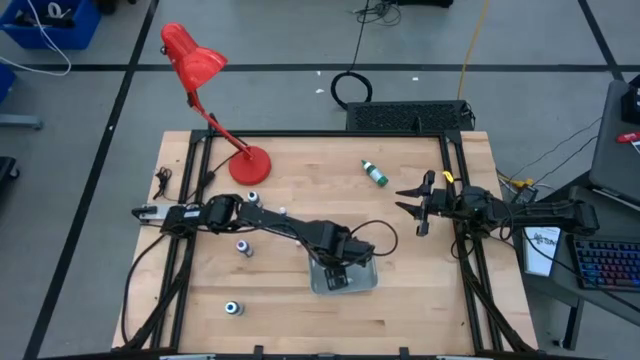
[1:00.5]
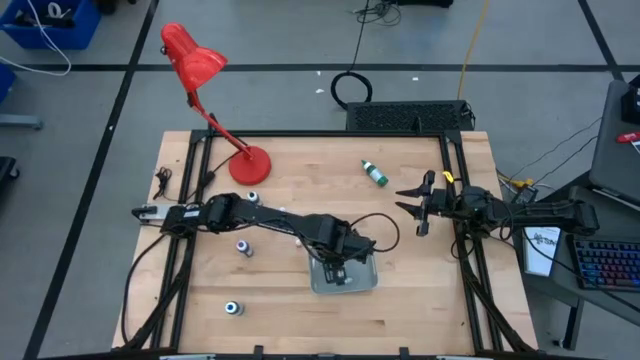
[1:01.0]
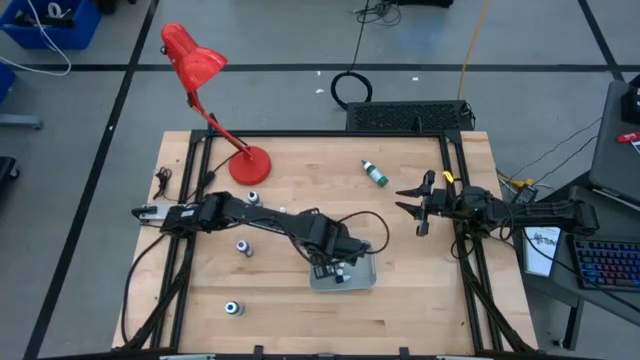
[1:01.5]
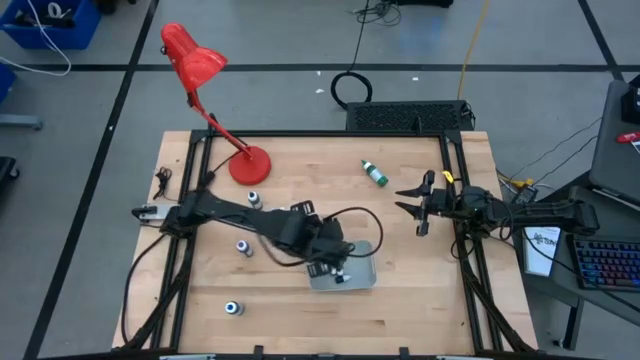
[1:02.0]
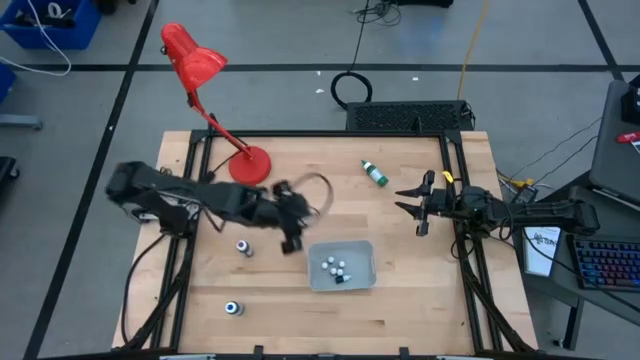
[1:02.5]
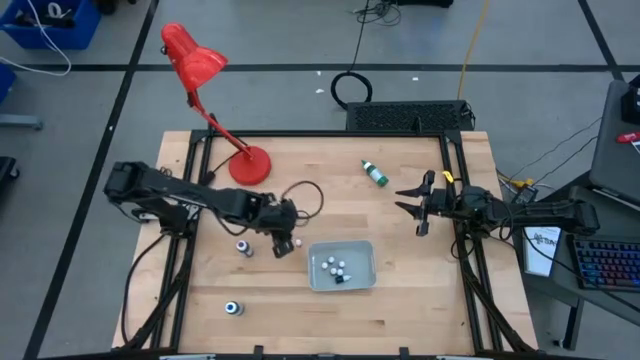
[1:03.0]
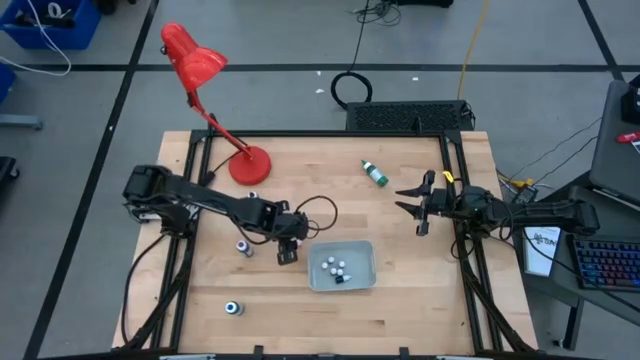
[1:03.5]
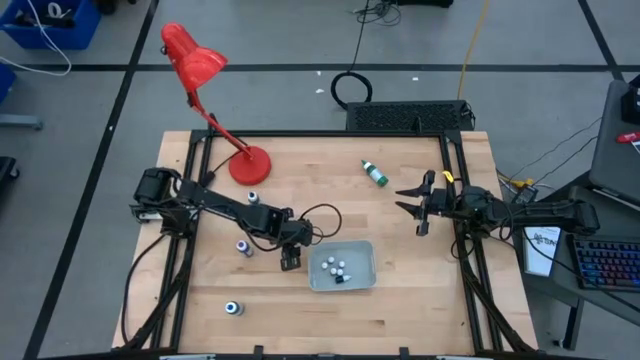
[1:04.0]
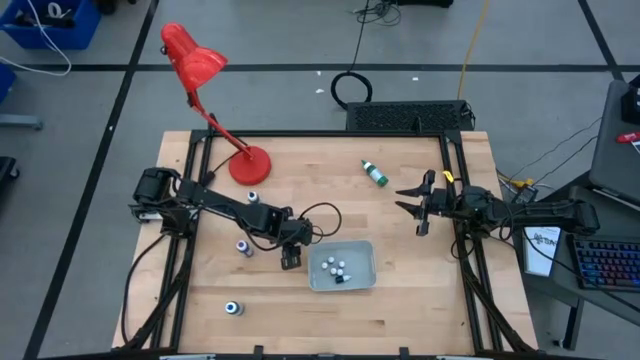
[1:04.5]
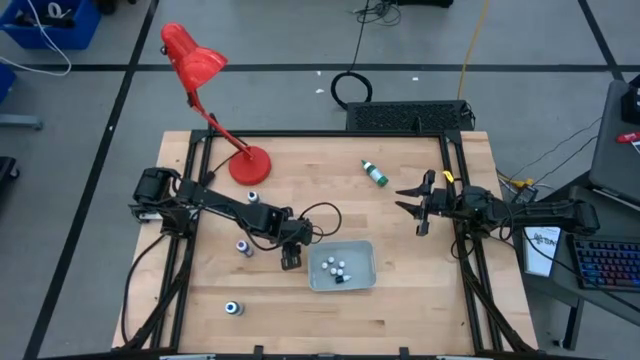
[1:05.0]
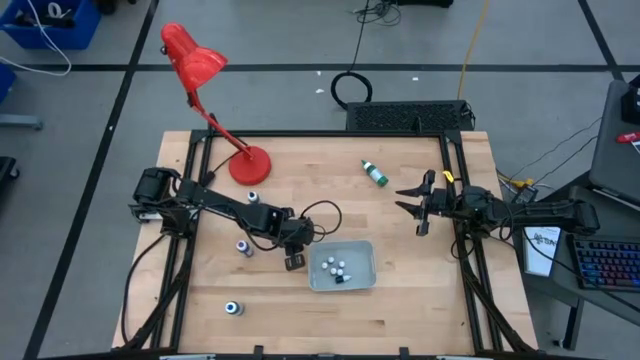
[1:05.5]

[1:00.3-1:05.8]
Task: Pick & Place food coloring
Put the small orange food coloring bottle into the gray bin

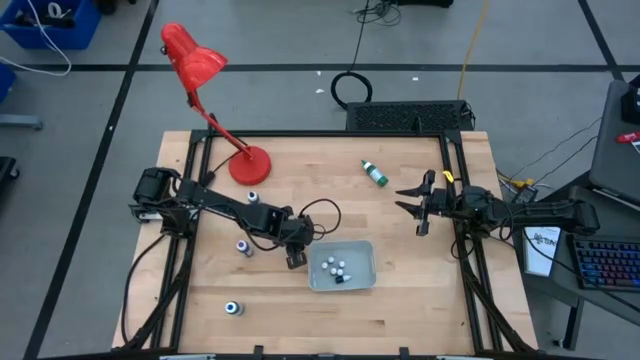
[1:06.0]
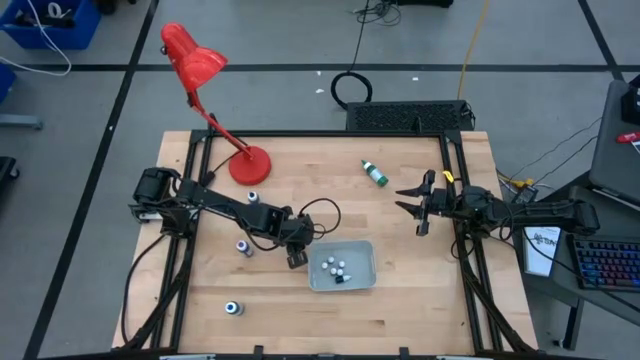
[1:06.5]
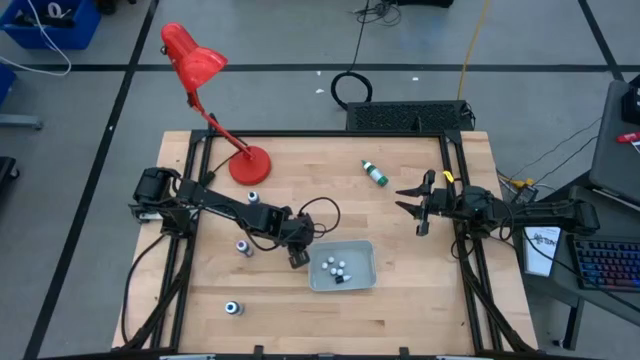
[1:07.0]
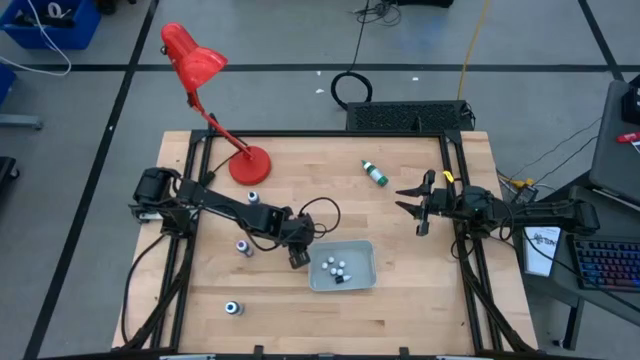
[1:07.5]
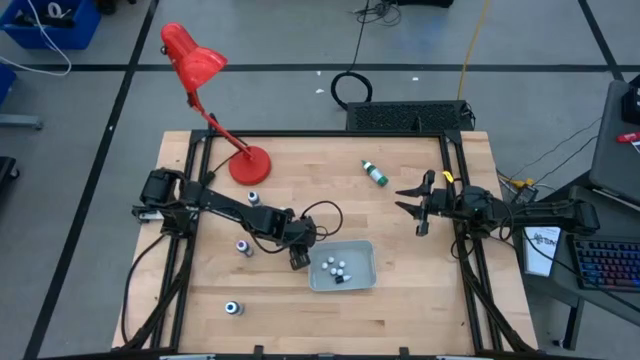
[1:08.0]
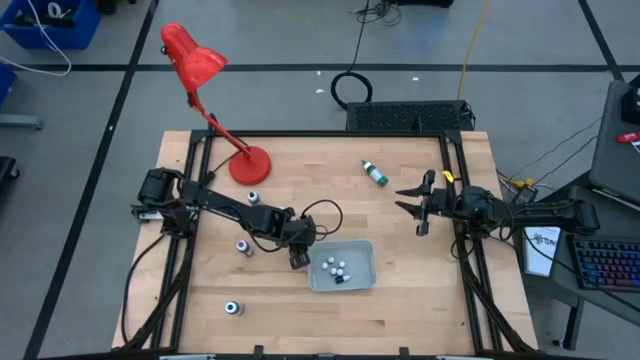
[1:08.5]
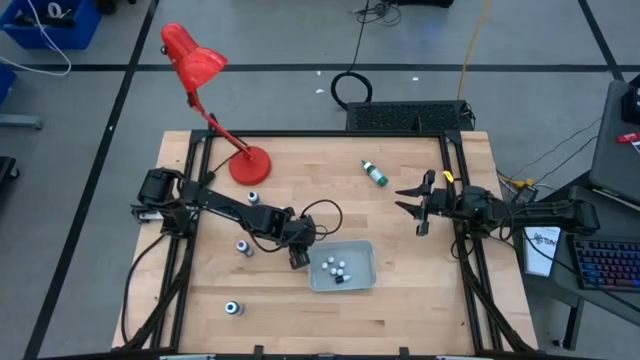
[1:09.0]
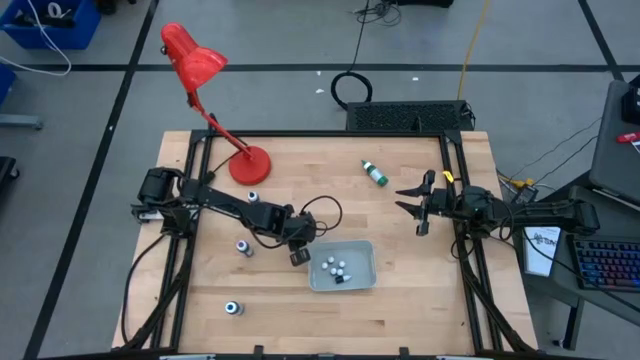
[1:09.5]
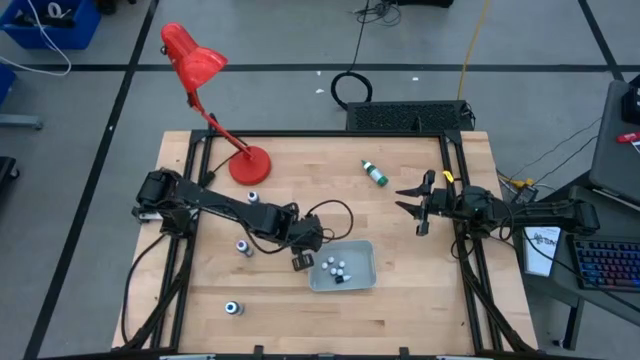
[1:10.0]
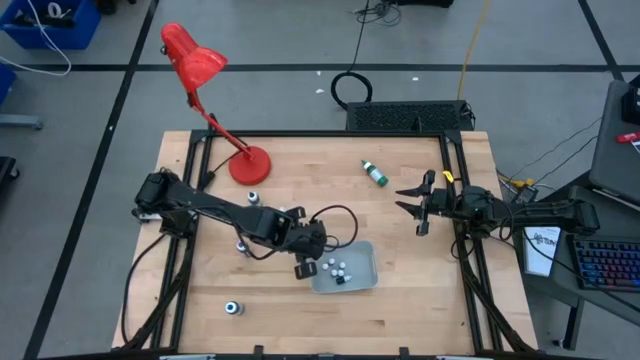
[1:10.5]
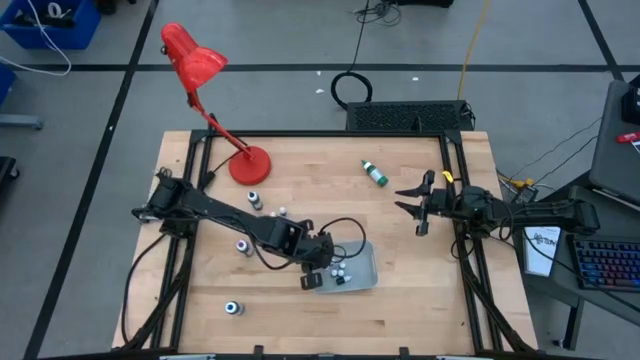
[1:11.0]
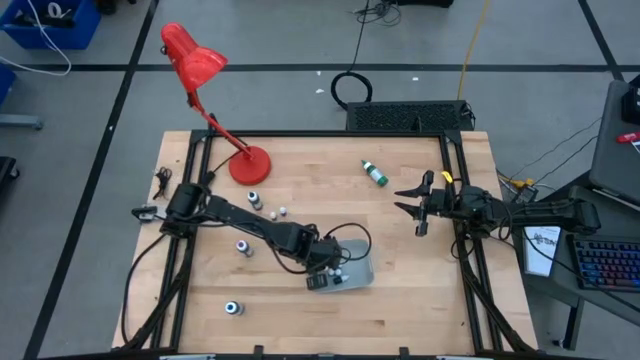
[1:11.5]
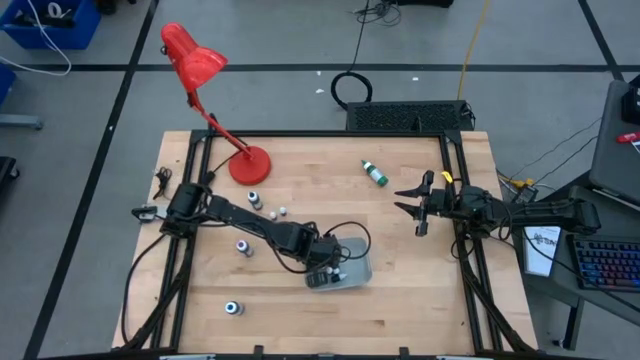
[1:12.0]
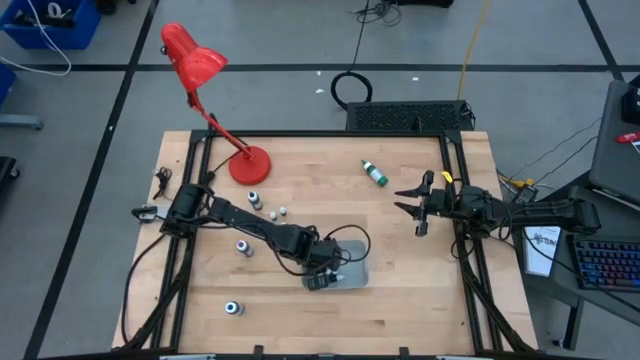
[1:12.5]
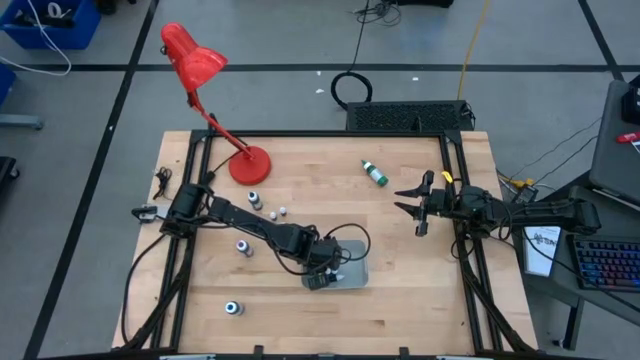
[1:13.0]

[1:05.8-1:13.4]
Put the small orange food coloring bottle into the gray bin

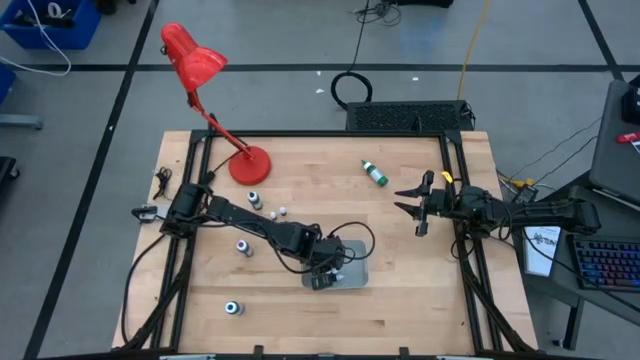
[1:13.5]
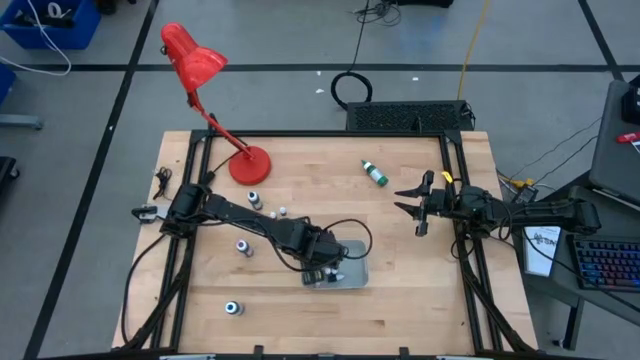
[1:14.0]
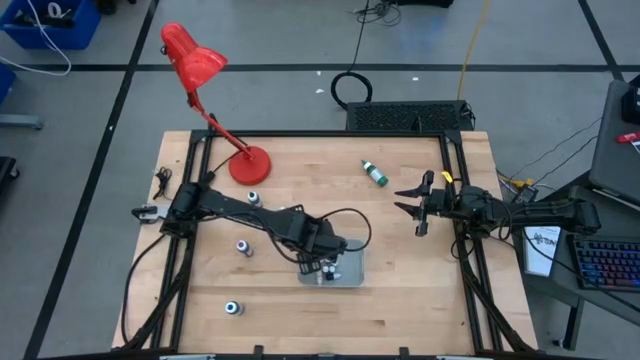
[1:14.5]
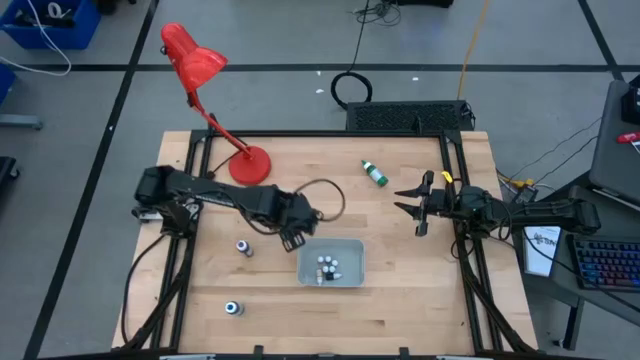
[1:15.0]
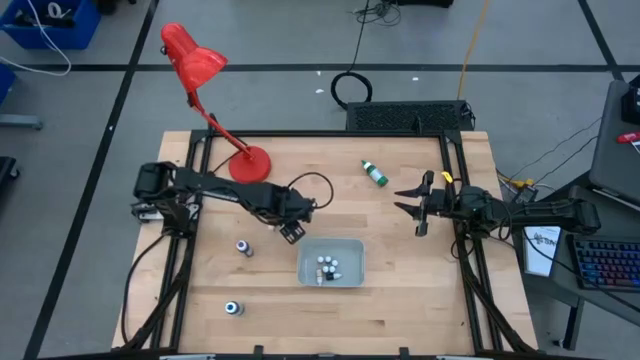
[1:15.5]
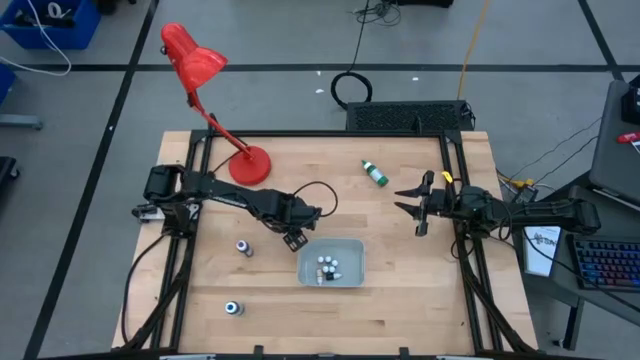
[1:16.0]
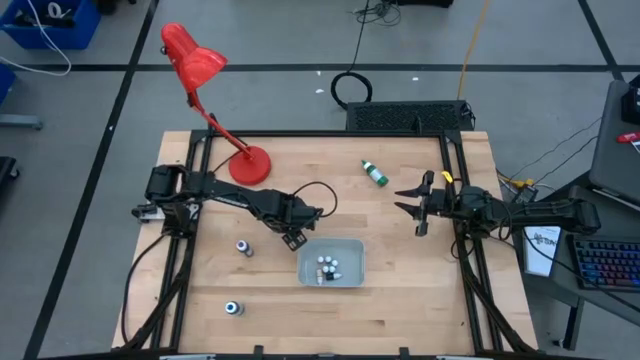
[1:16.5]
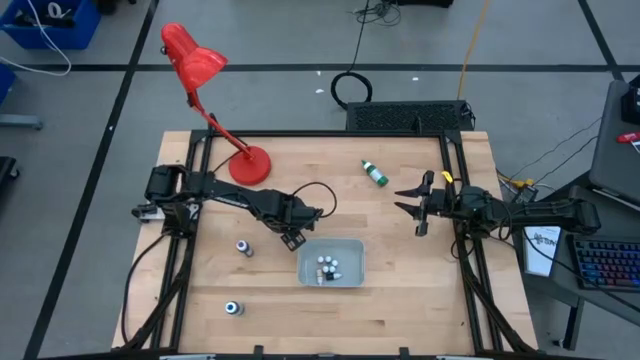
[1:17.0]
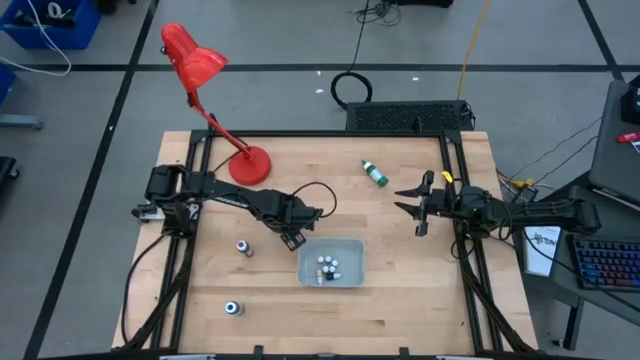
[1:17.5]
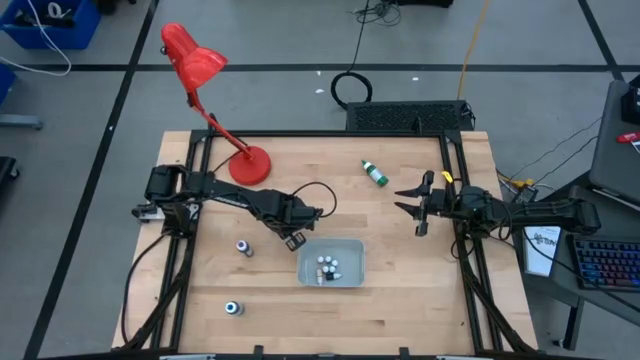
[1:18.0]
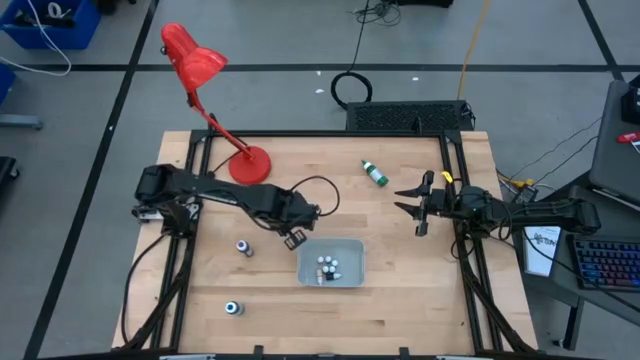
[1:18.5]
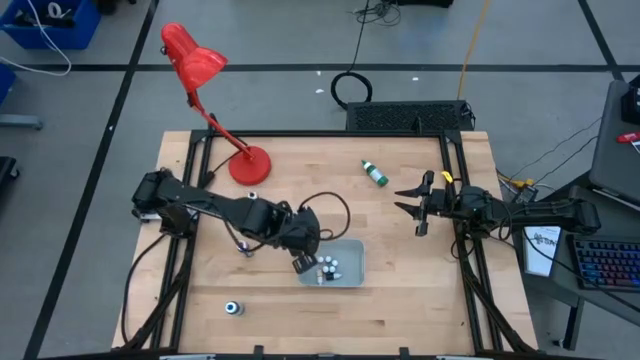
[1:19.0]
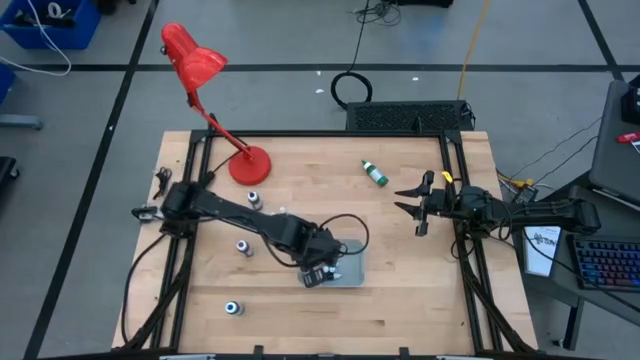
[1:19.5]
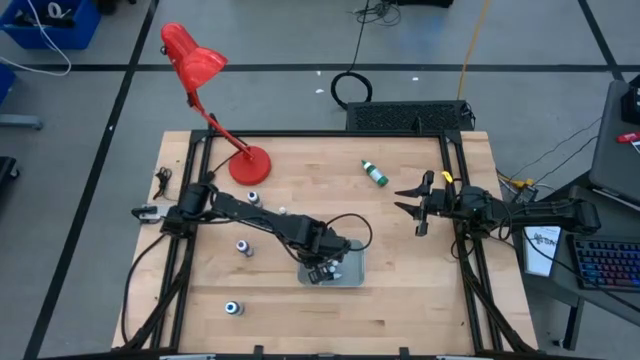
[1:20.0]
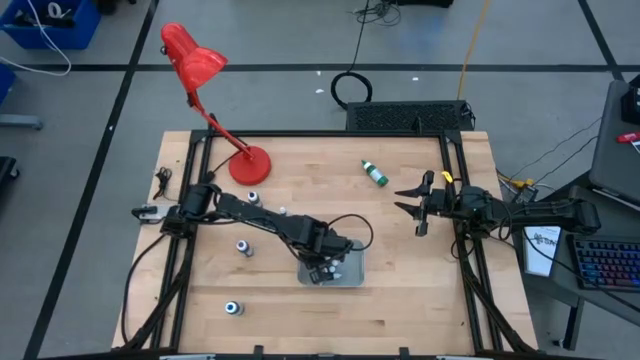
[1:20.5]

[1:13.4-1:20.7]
Put the small orange food coloring bottle into the gray bin

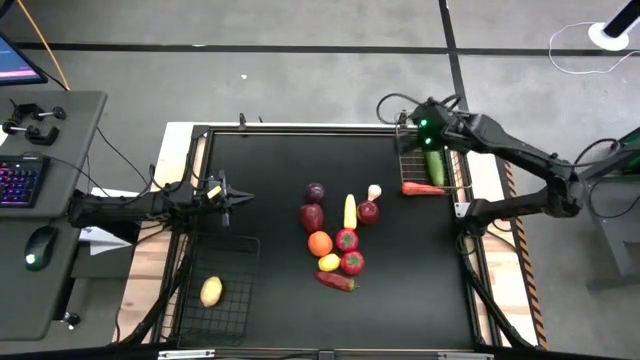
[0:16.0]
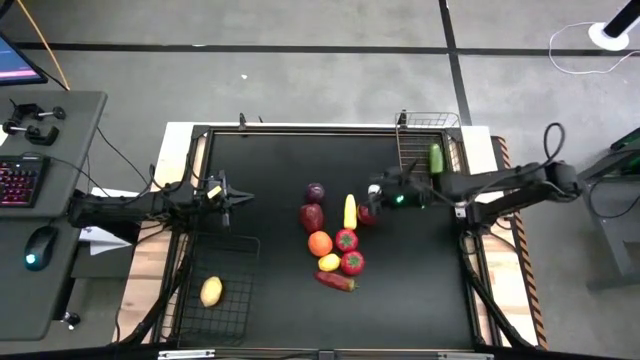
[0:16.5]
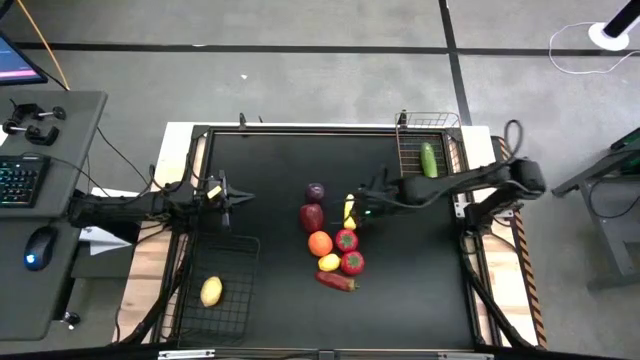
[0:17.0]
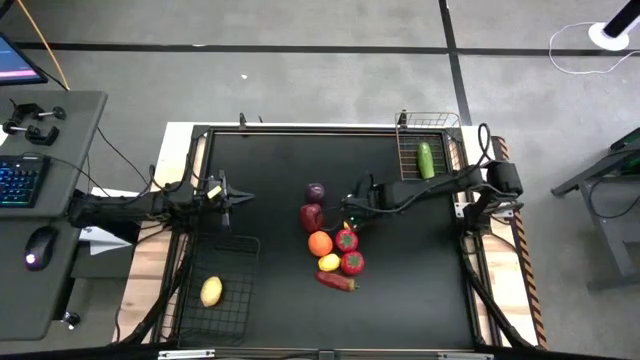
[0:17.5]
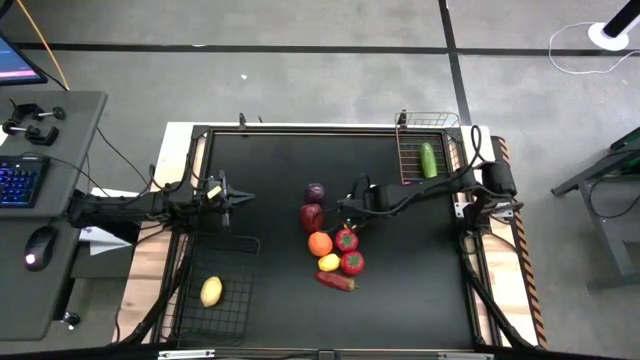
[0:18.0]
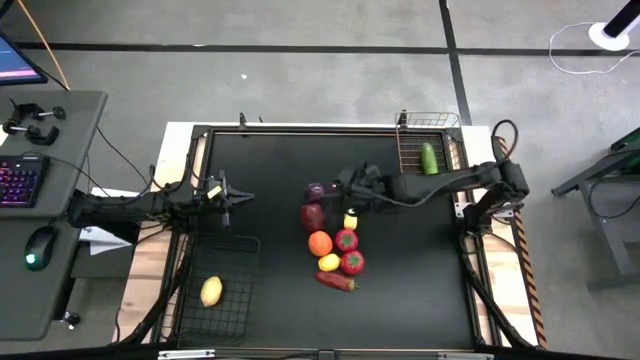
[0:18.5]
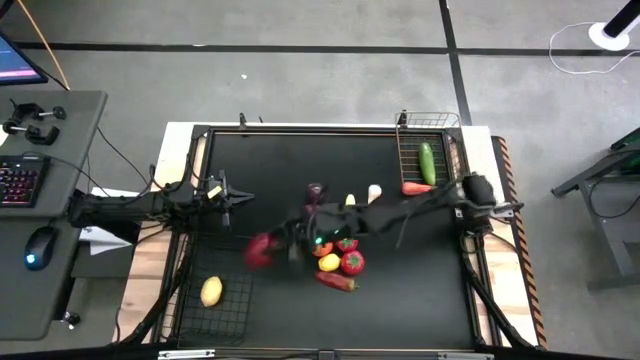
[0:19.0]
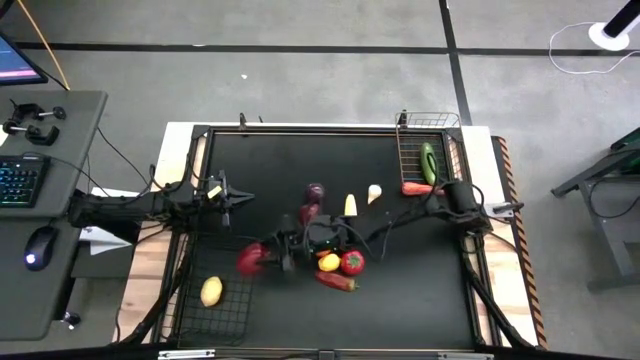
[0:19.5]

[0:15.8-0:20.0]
Task: Sort produce into baskets
Put the right apple into the left wire basket
